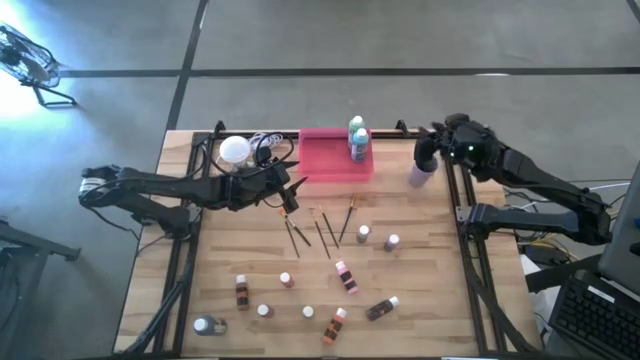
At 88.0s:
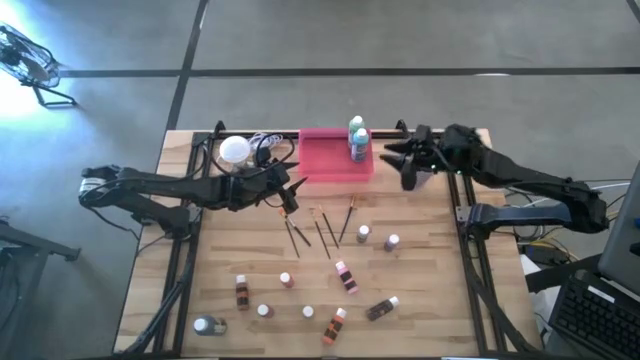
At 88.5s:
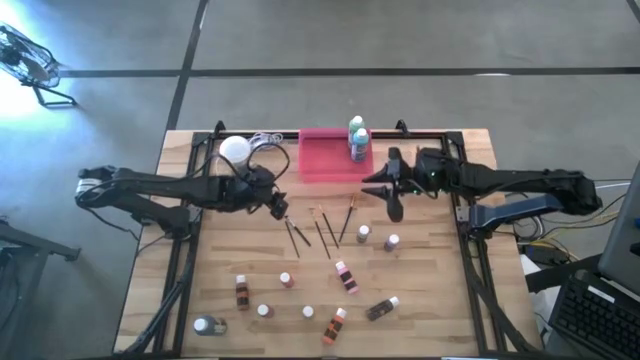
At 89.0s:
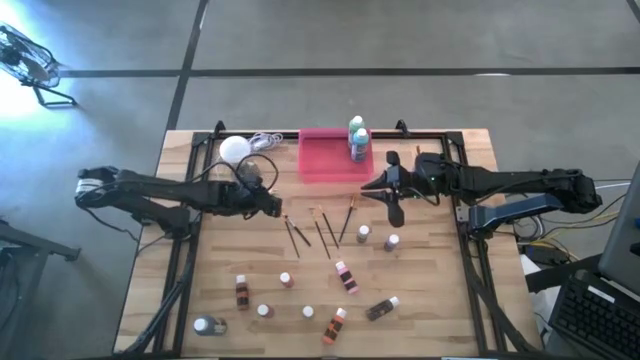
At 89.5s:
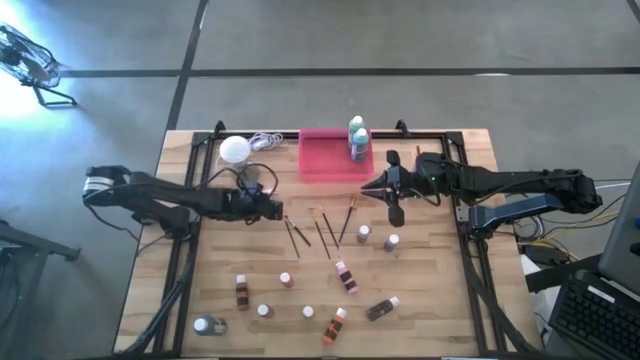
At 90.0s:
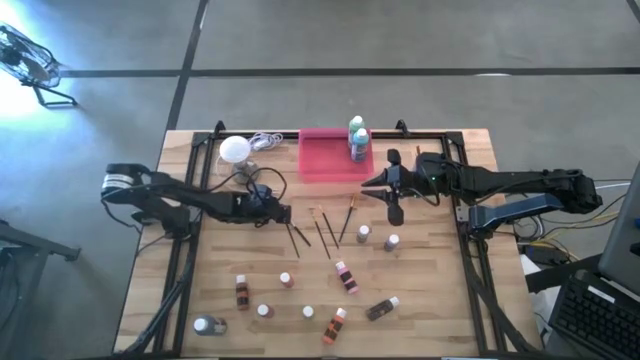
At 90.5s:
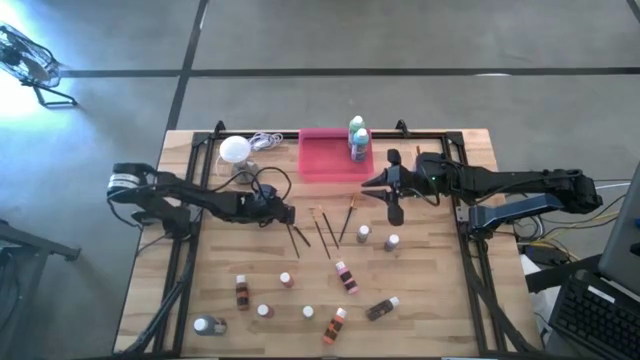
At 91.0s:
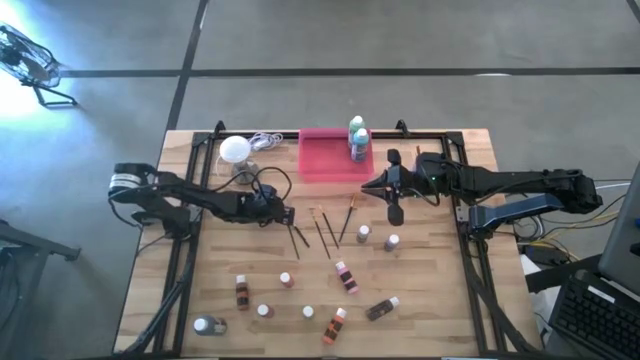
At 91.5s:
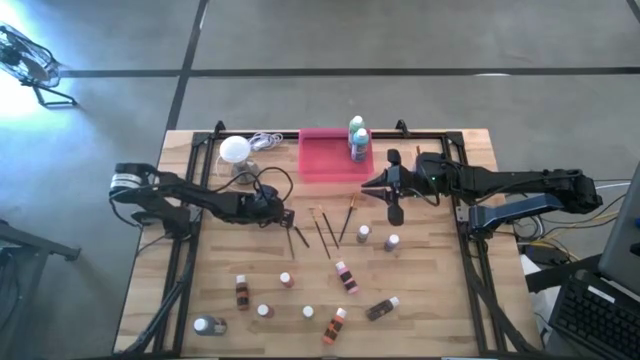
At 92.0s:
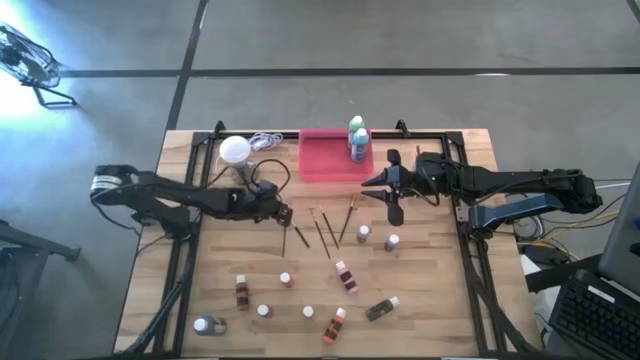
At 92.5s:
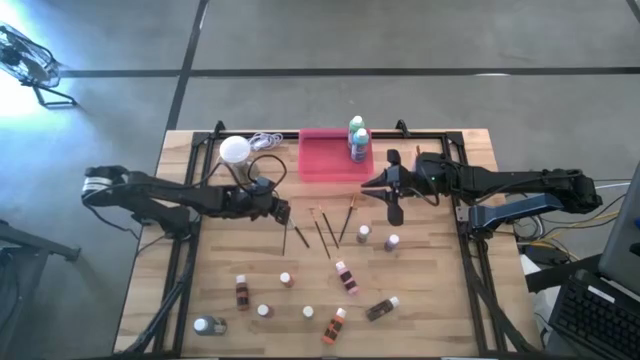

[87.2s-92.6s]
Task: Pick & Place Paint Supplies
Put the black gold paint brush into the violet cup

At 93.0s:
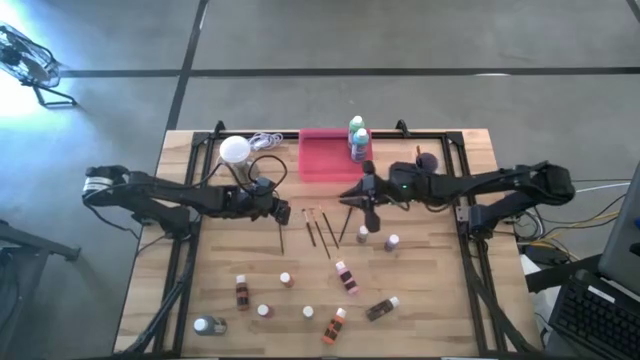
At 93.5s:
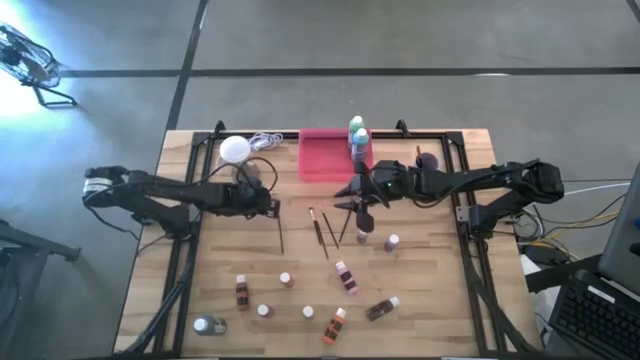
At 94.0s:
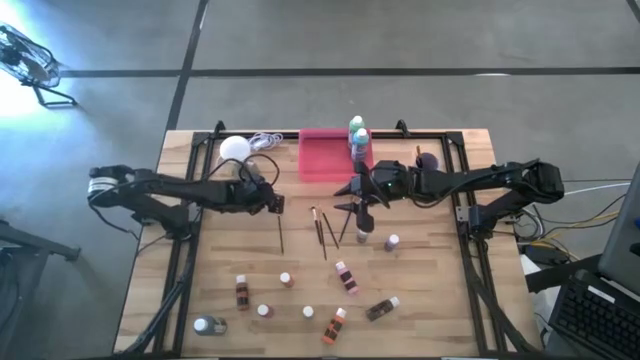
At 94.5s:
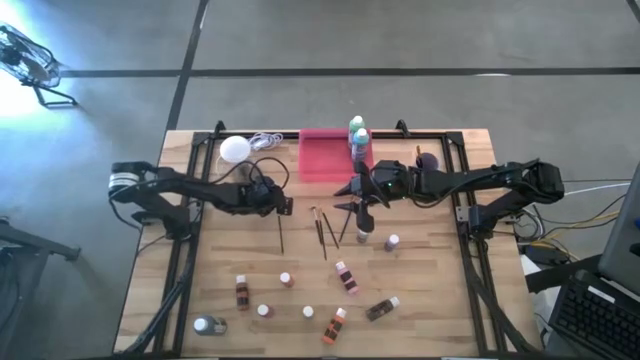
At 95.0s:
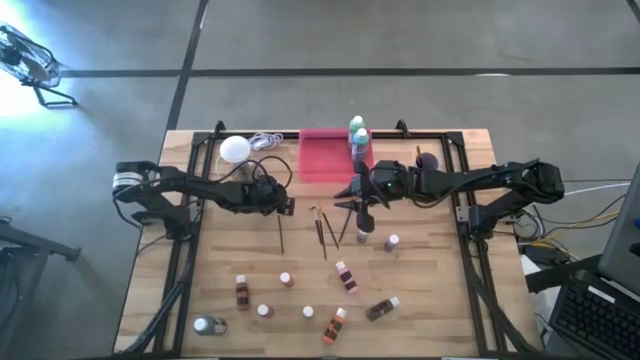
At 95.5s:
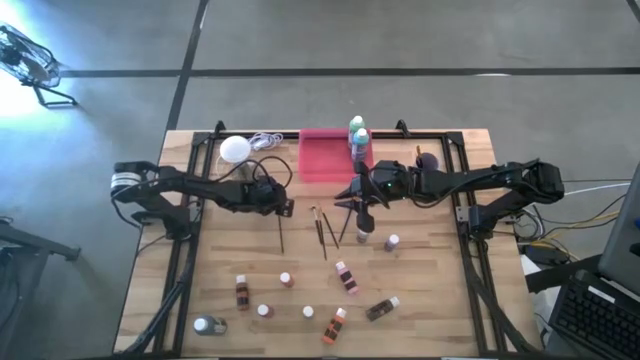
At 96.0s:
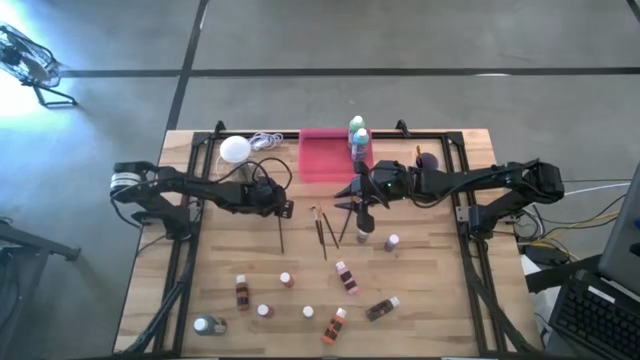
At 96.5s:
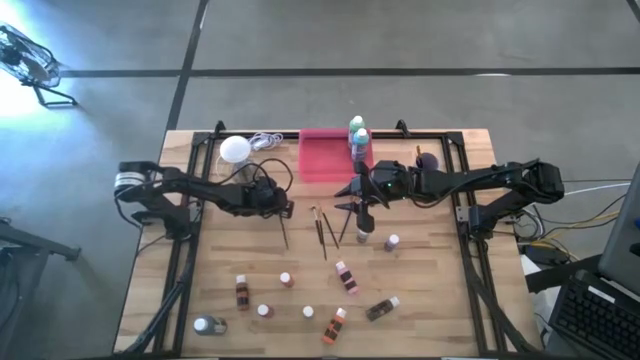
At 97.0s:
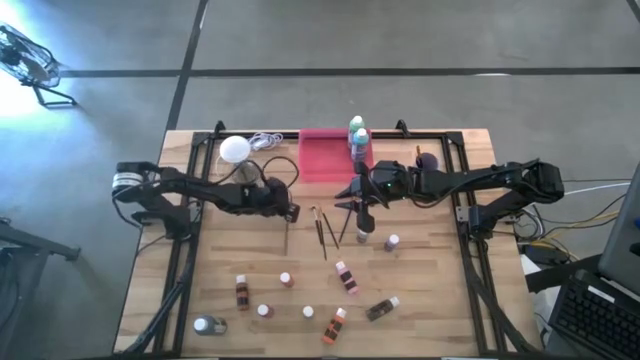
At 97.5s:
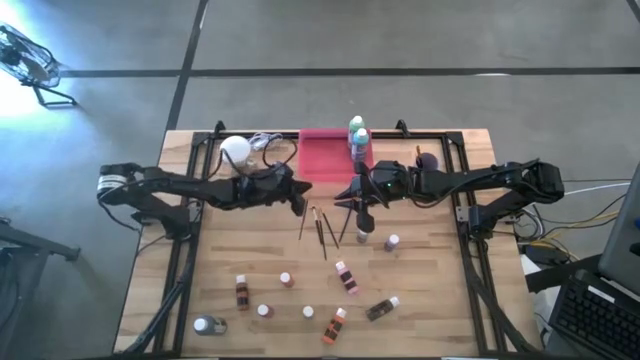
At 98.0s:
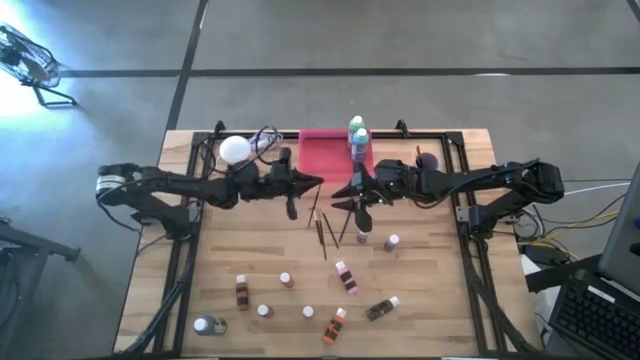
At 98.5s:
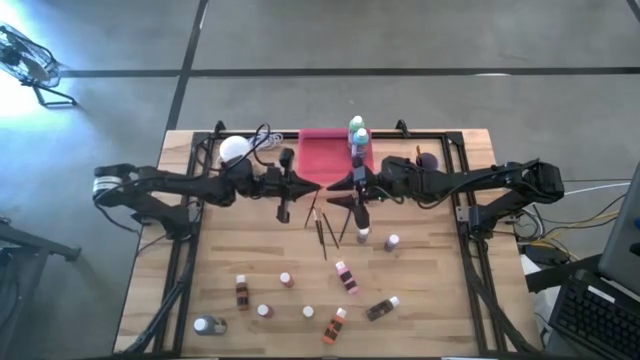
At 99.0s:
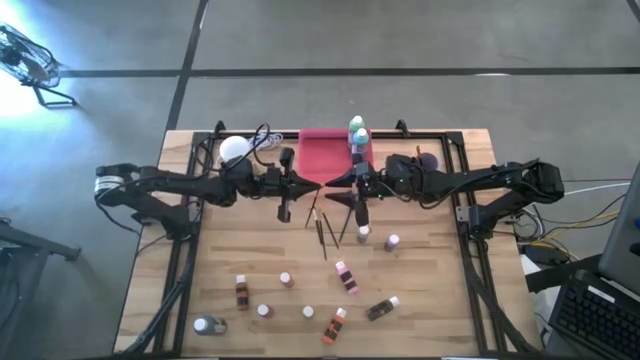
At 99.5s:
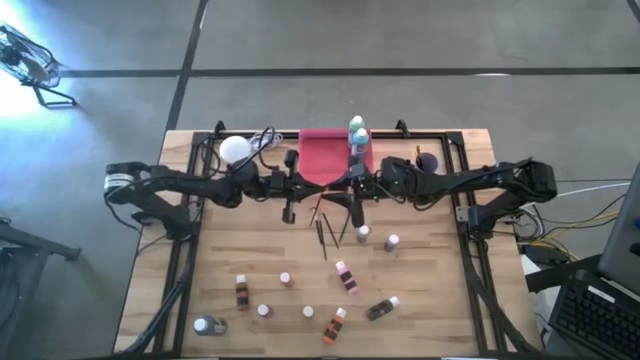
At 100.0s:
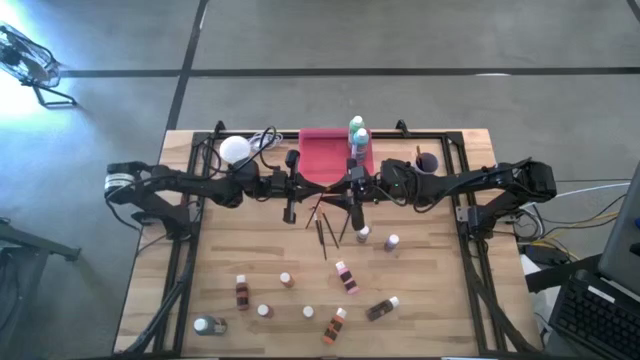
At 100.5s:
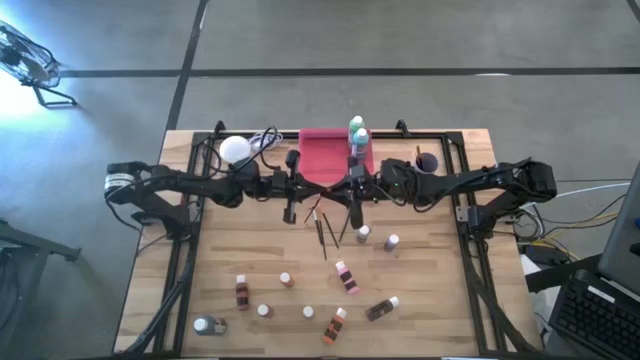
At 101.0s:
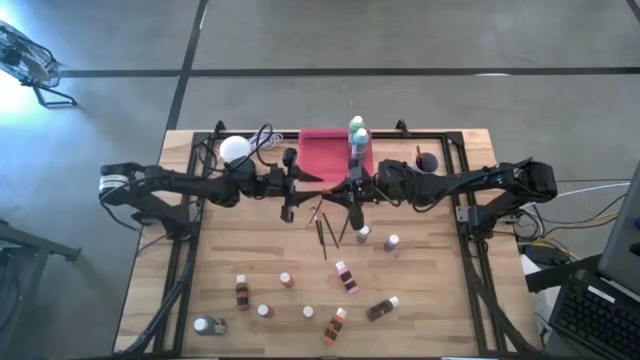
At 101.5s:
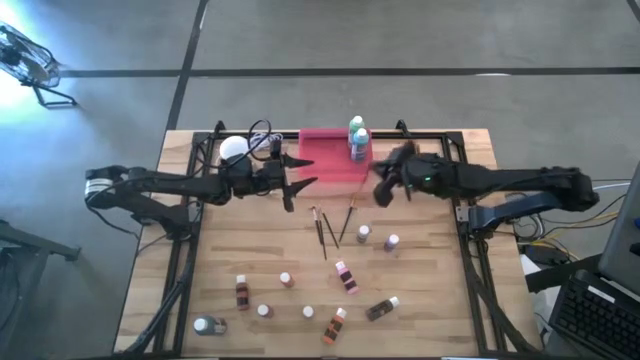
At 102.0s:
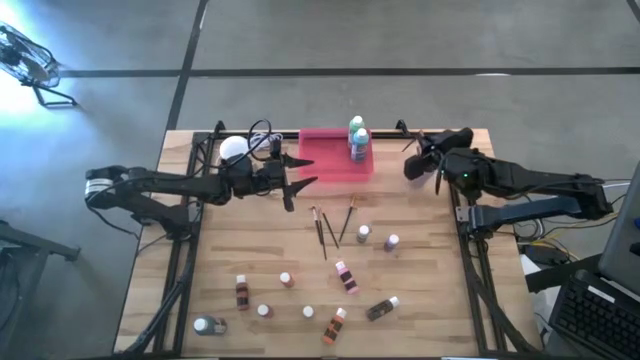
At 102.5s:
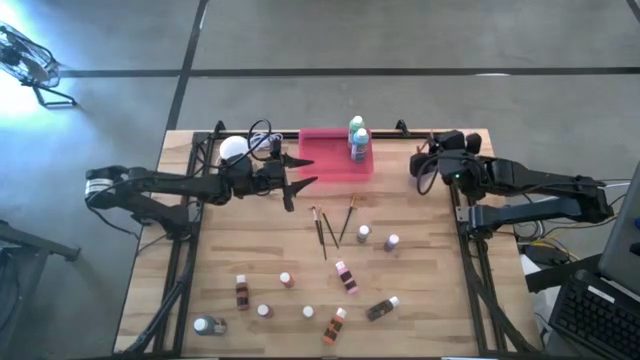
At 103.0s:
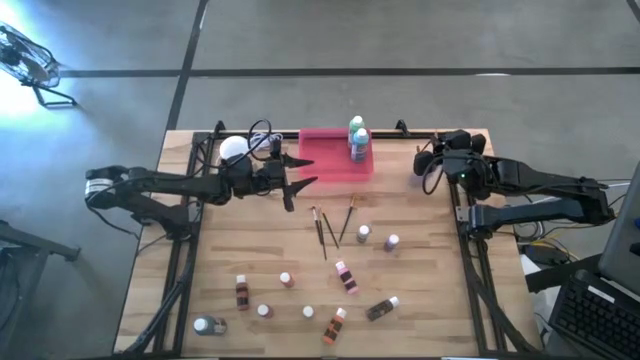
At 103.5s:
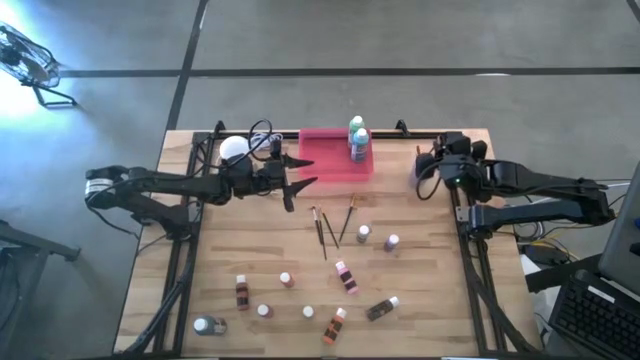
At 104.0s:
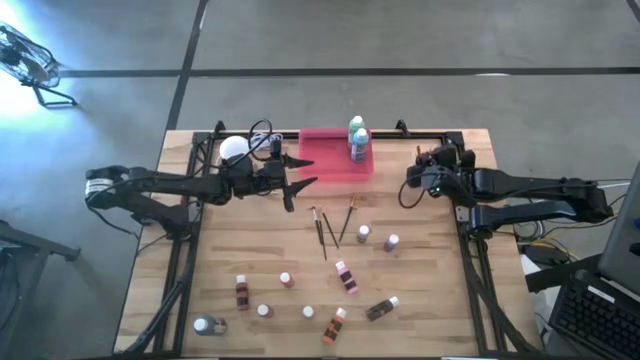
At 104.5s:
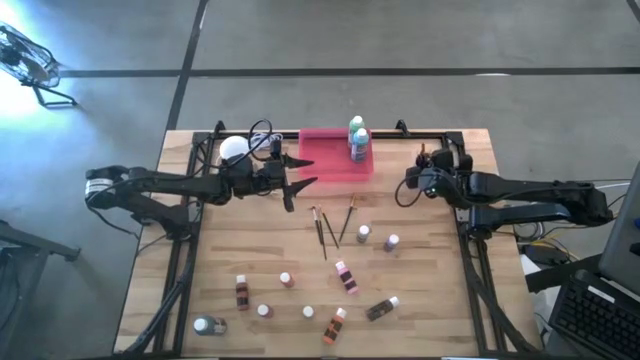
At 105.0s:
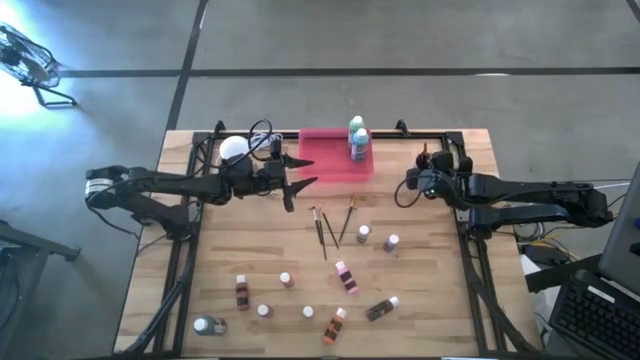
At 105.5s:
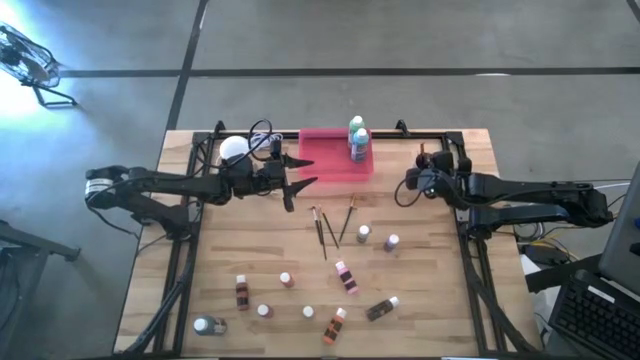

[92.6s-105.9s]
Put the black gold paint brush into the violet cup

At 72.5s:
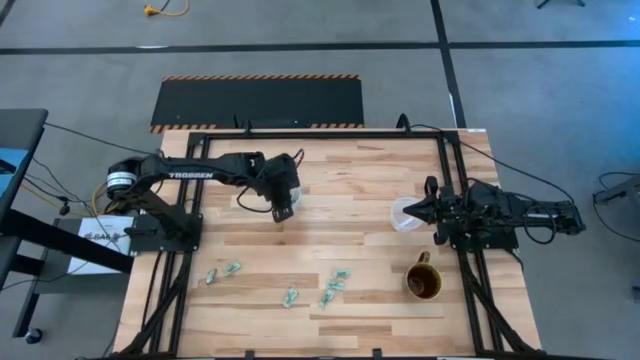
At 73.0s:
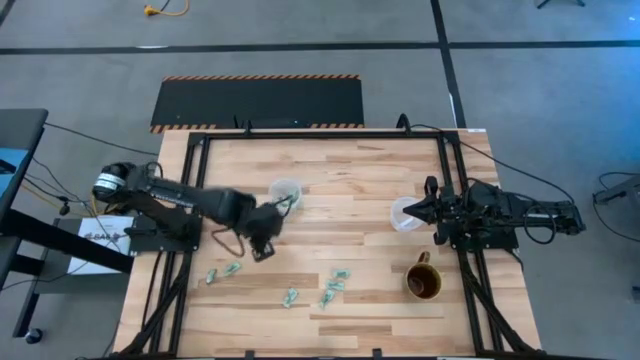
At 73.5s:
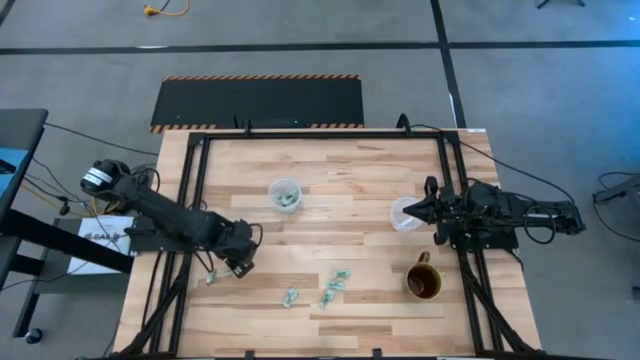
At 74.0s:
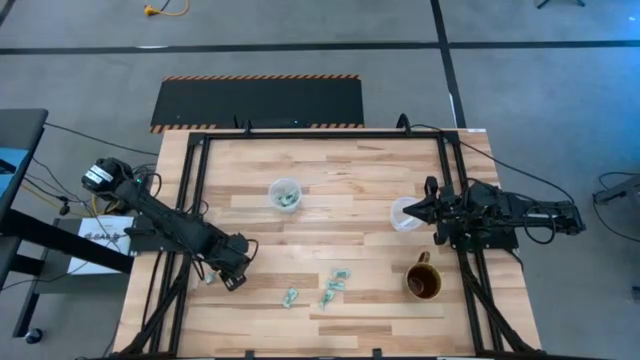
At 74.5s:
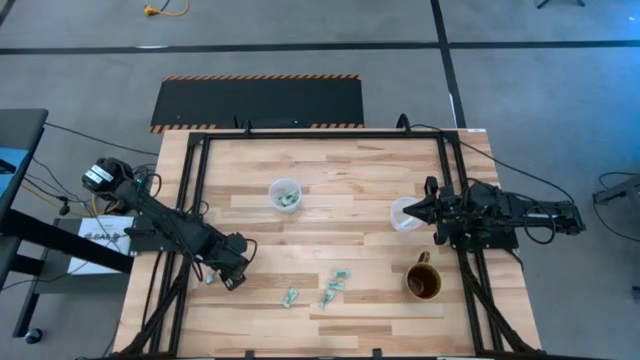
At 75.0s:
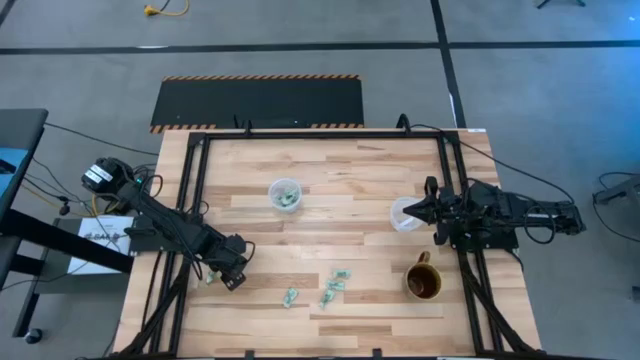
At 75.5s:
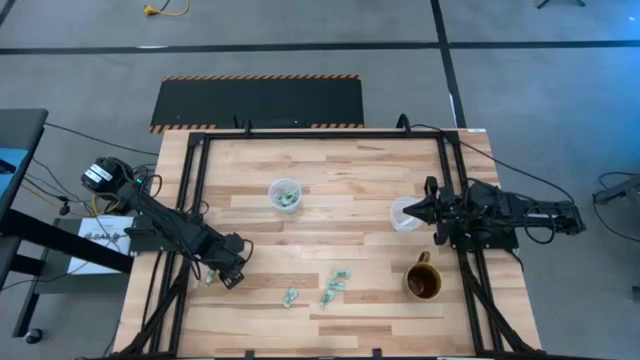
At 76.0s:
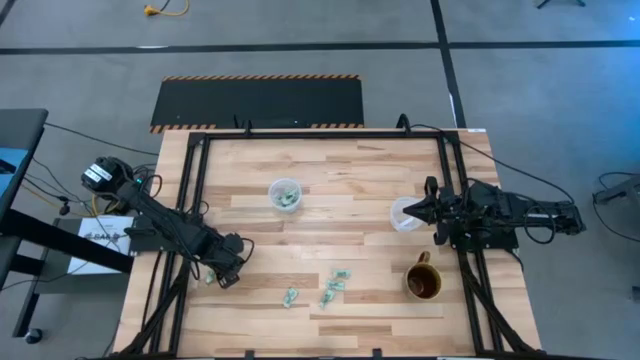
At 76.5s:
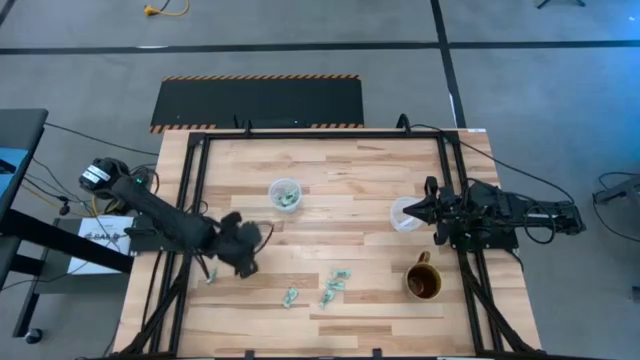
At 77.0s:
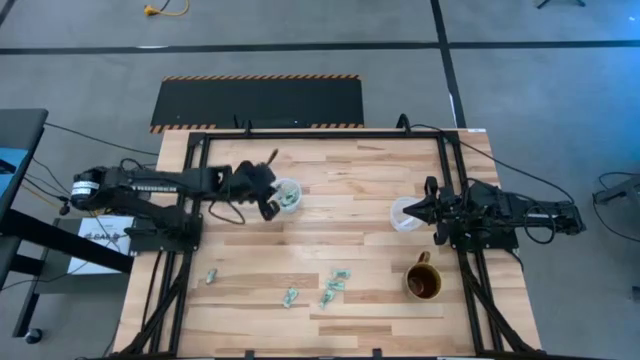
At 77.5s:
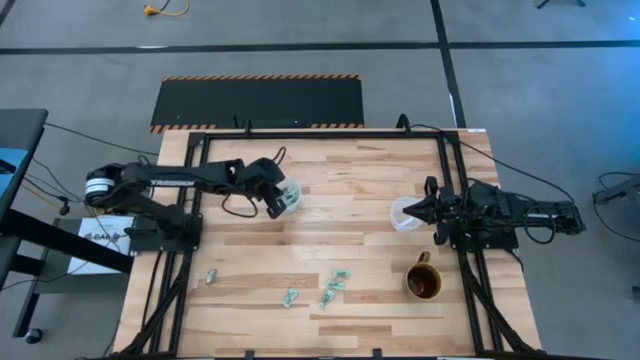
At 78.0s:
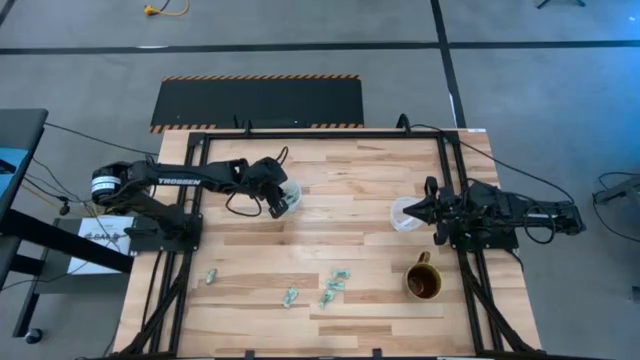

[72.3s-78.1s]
Task: Pick and place Stevia / Truvia into bins
Put the white stevia packet into the left transparent container
